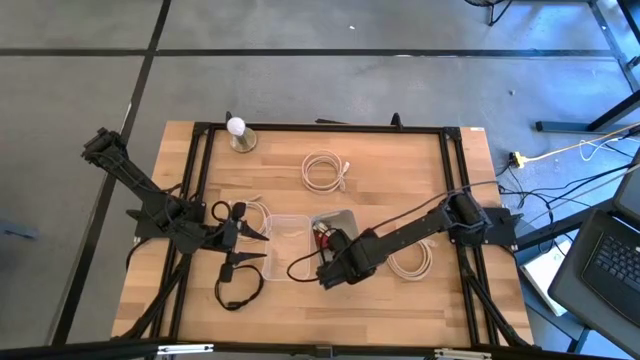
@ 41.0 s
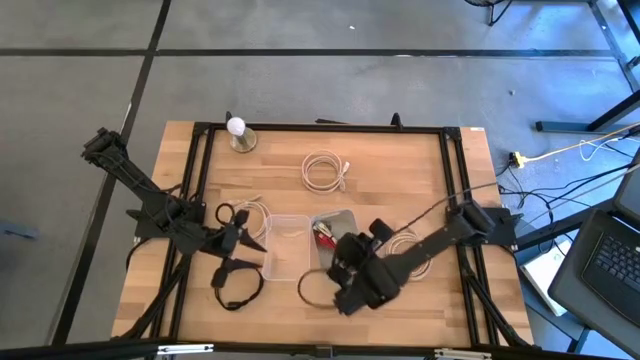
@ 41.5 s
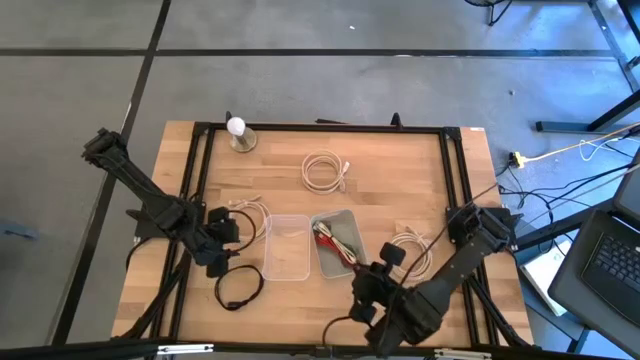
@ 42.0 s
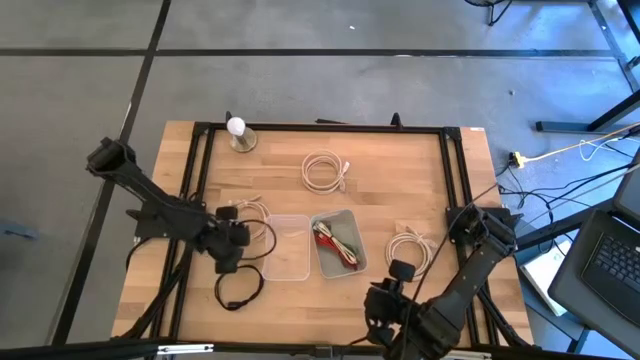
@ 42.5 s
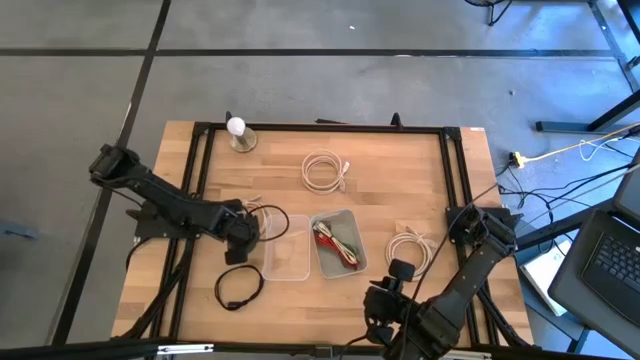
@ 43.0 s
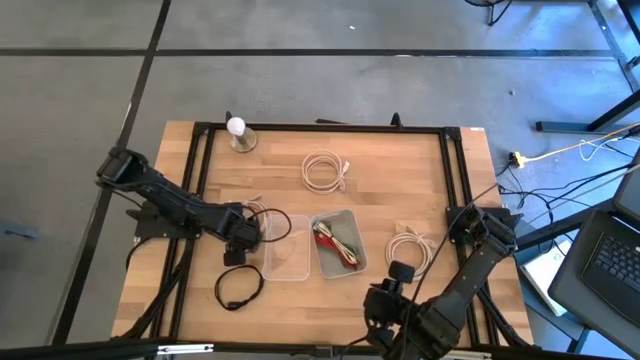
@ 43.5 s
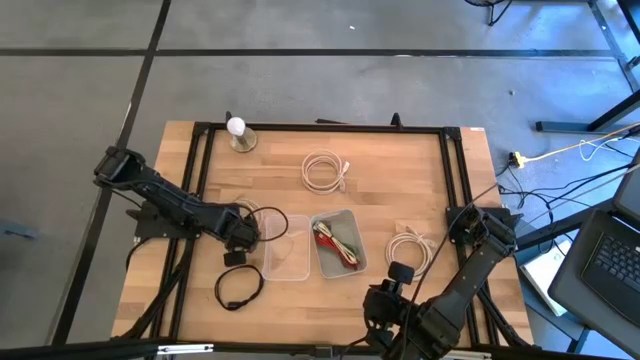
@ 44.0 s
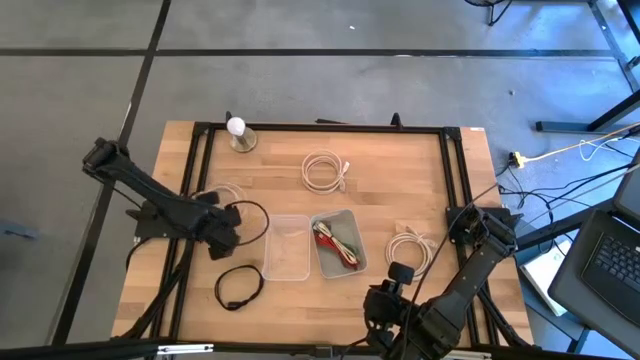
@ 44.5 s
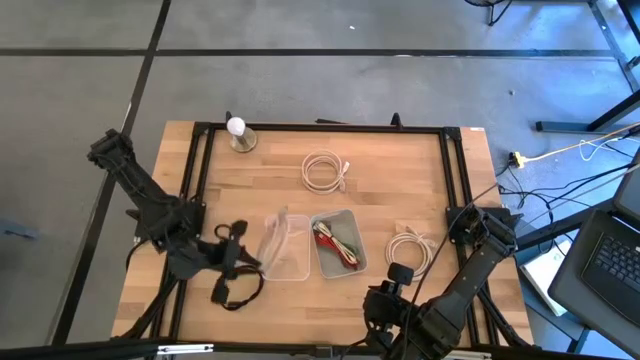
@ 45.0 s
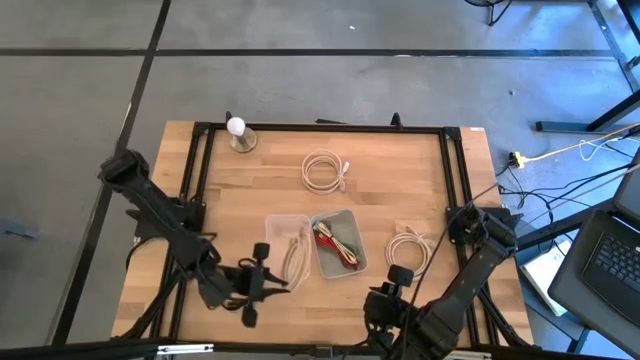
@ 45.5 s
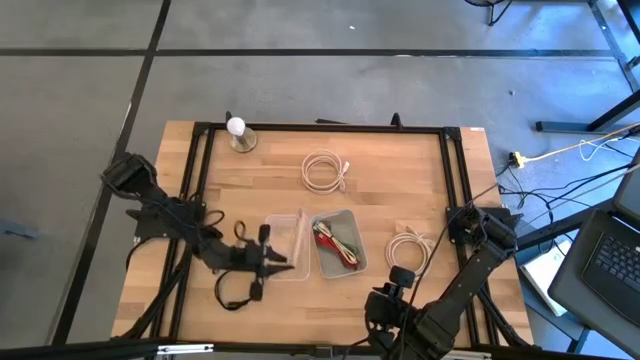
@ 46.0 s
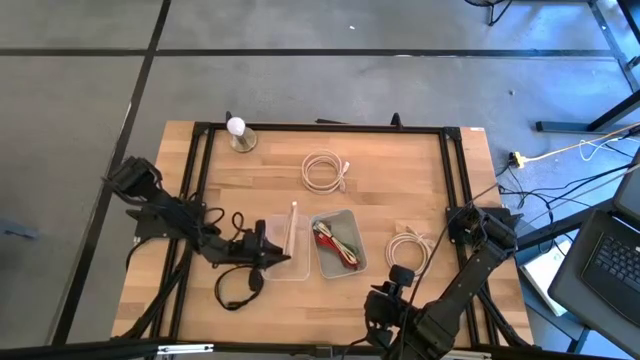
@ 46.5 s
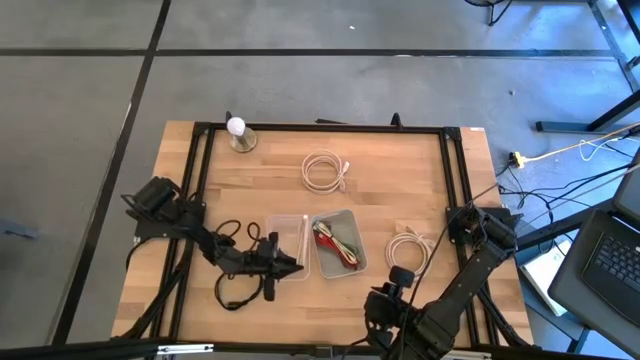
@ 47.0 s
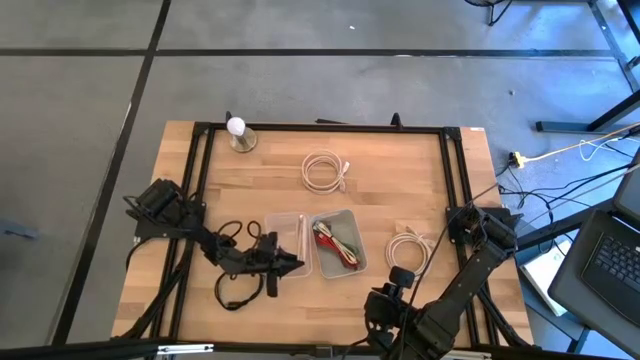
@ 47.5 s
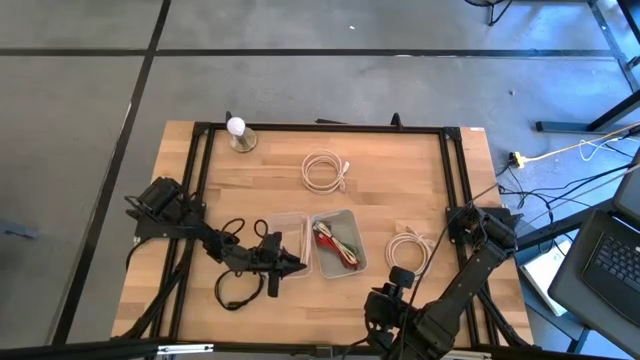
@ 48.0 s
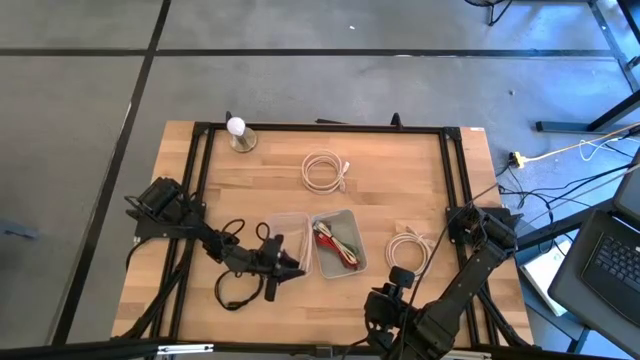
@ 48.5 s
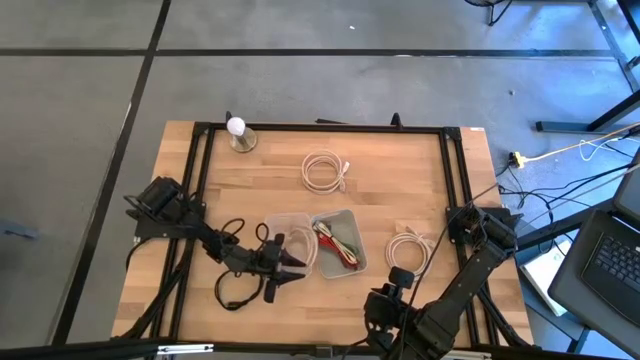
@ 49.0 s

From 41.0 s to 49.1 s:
Put the left white HDMI cable into the transparent bin

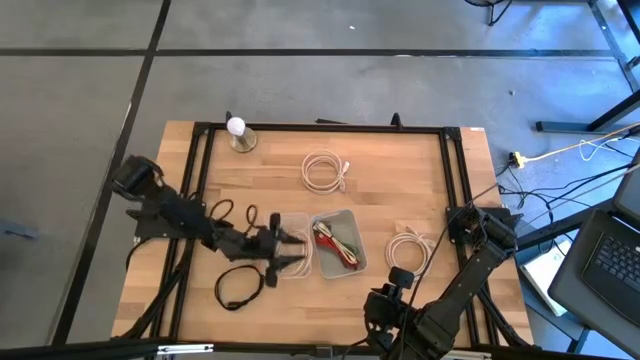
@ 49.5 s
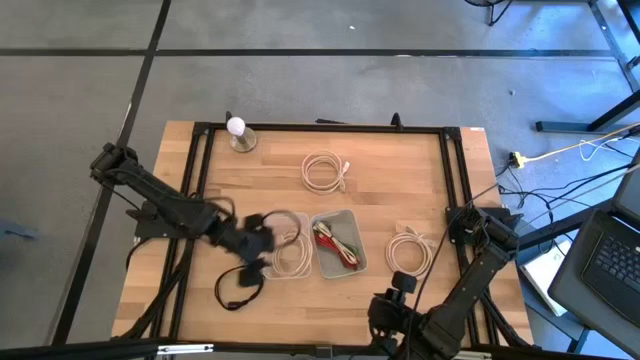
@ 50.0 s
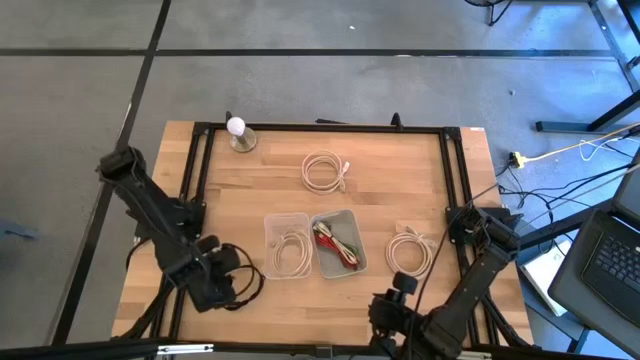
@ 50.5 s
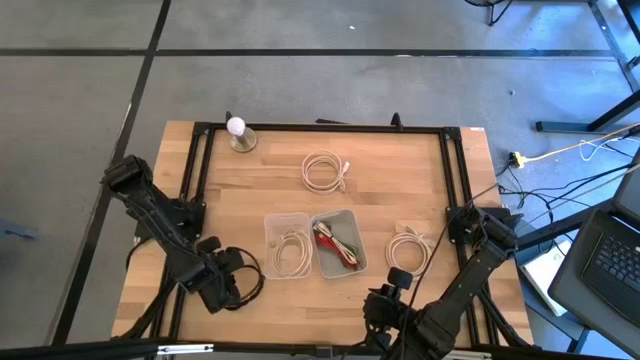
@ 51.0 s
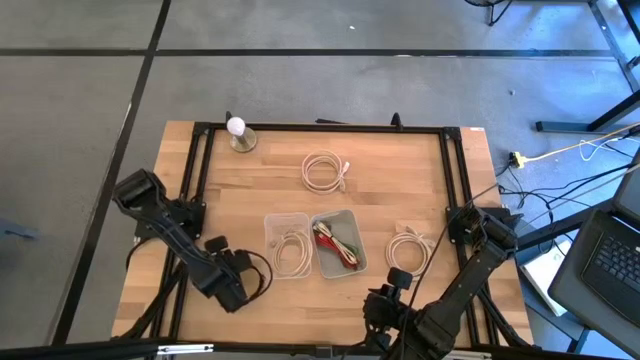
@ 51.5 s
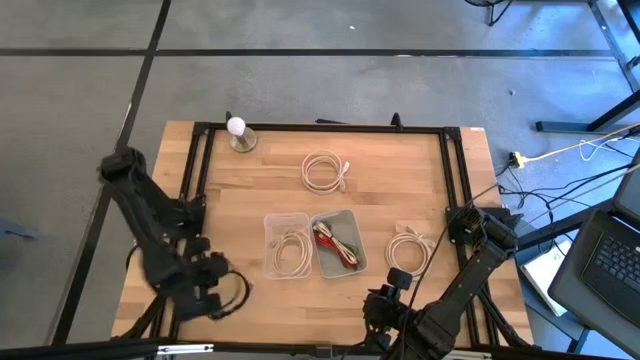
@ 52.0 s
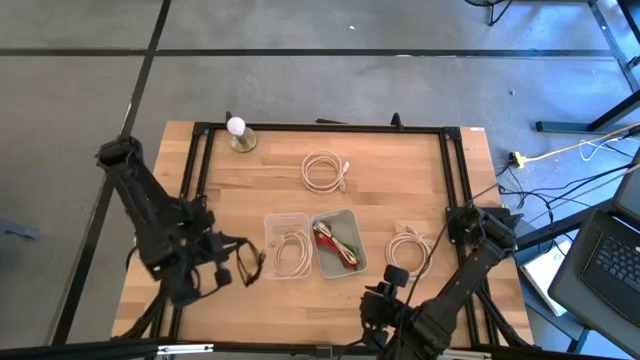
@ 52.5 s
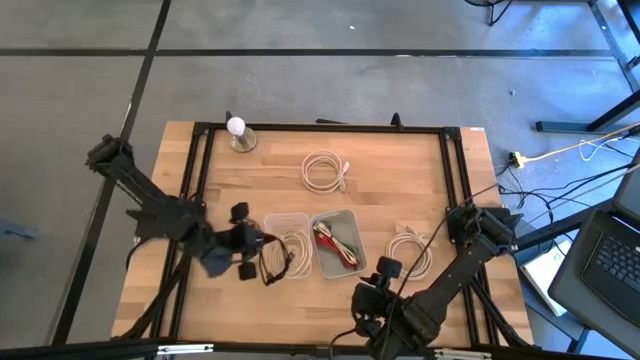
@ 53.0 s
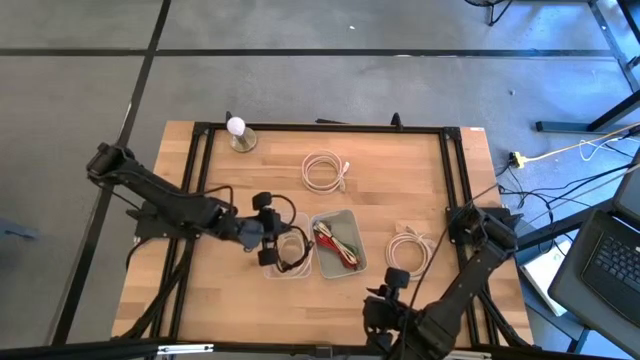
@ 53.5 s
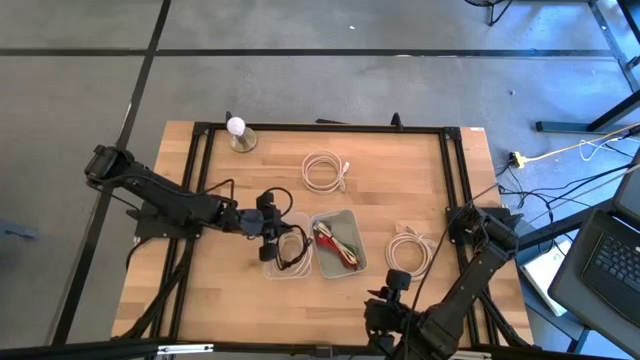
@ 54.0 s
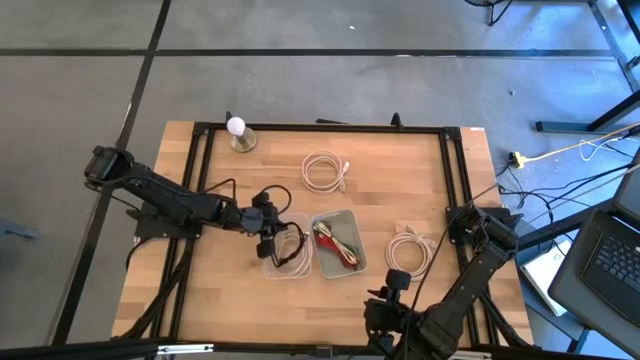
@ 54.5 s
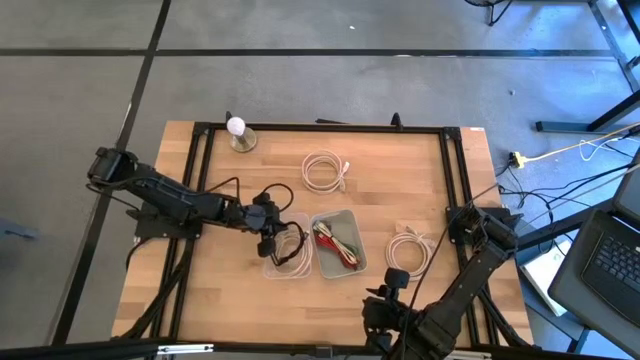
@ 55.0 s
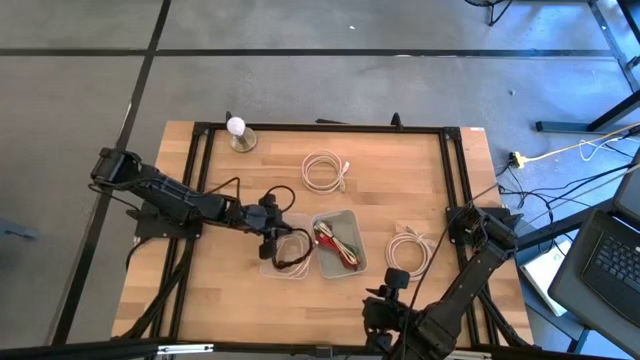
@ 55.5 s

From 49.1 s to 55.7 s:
Put the black HDMI cable into the transparent bin

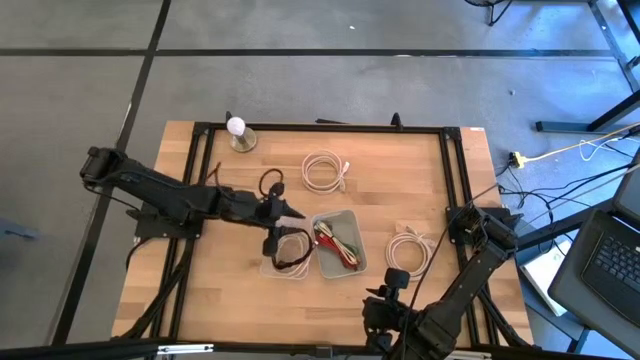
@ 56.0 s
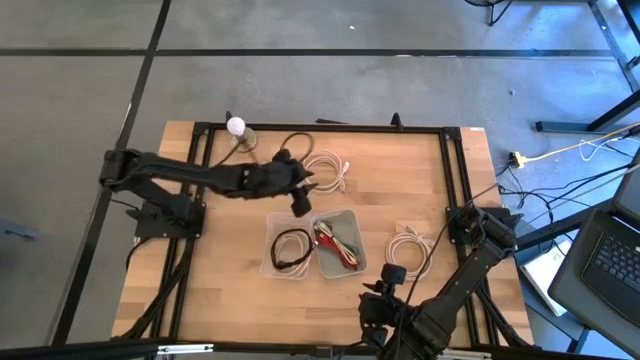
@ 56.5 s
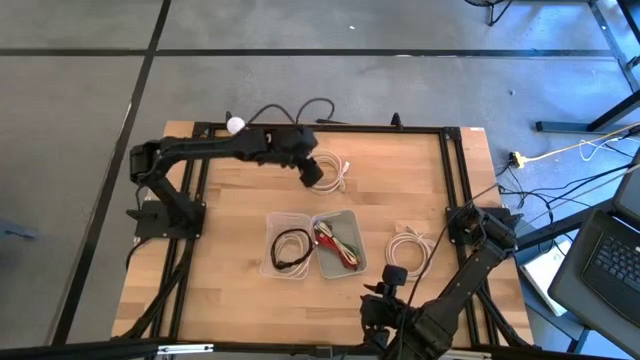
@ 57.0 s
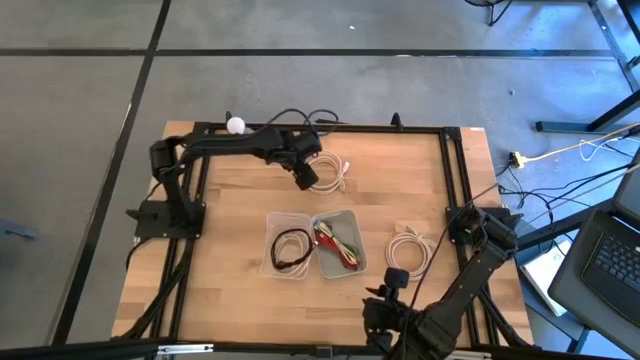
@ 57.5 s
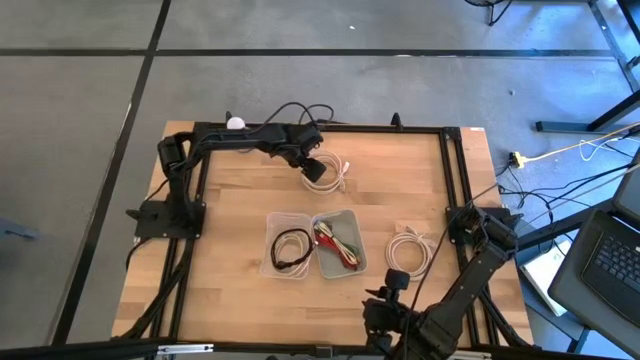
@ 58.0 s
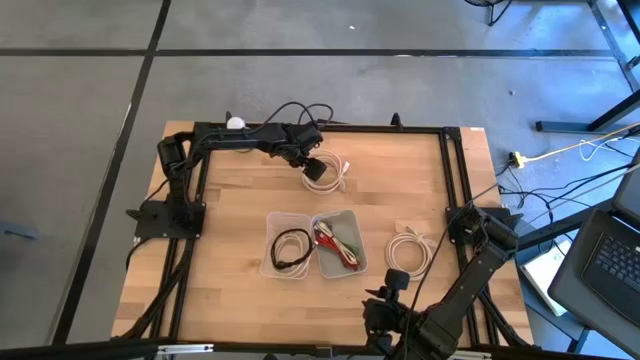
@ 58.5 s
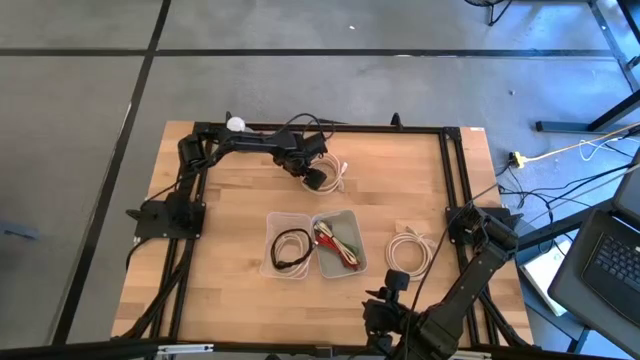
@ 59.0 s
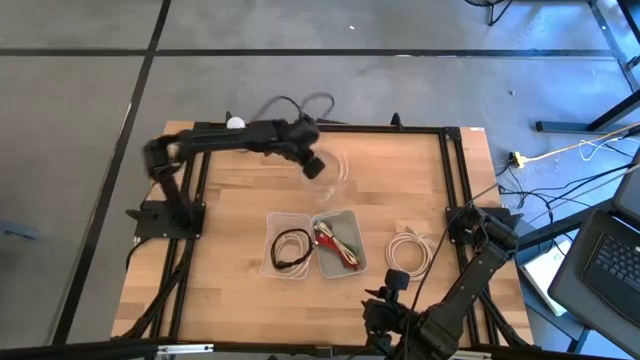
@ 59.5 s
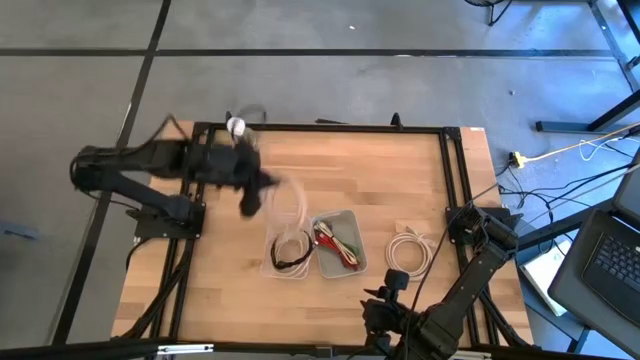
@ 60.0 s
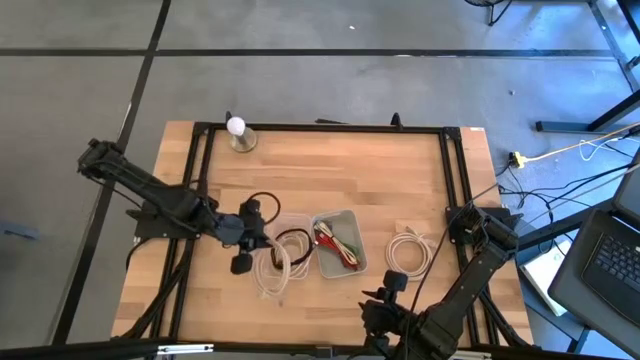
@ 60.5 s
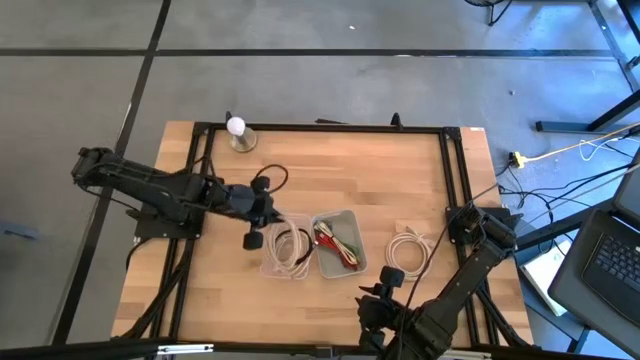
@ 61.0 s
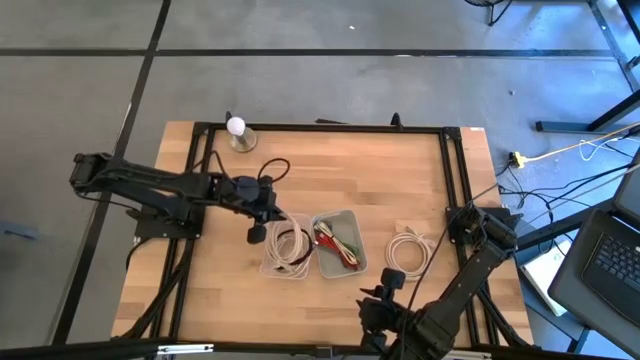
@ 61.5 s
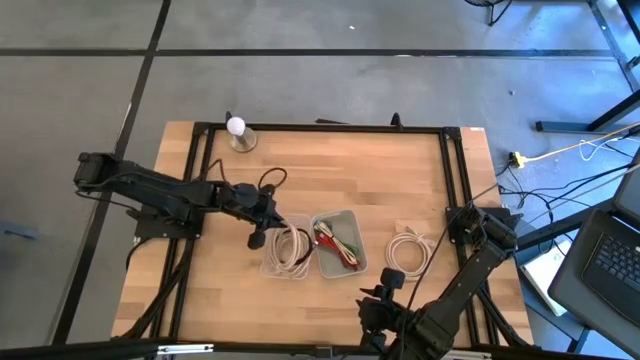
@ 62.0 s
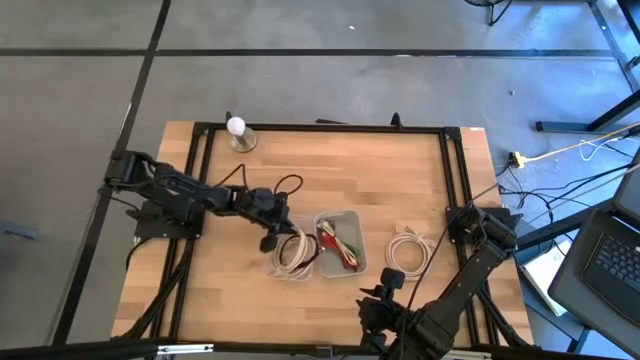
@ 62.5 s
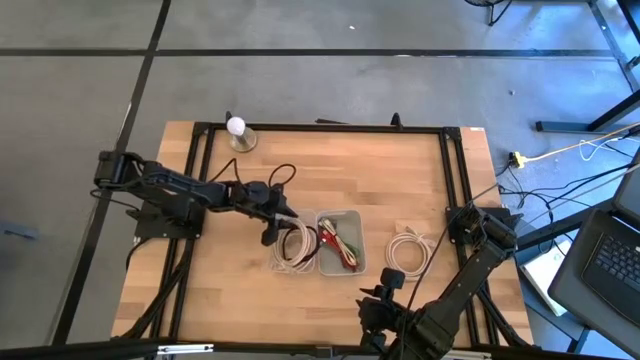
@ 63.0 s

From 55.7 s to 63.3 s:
Put the top white HDMI cable into the transparent bin
